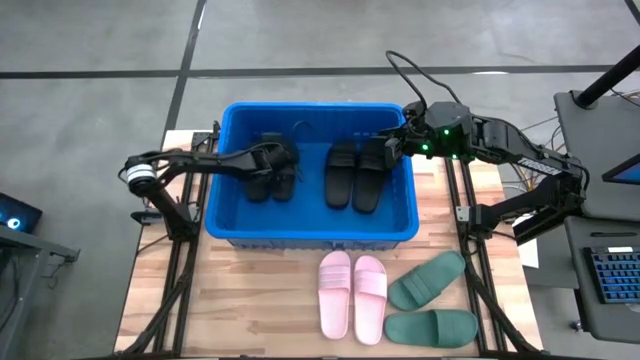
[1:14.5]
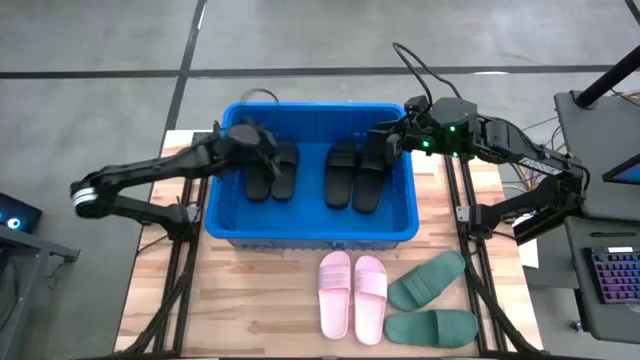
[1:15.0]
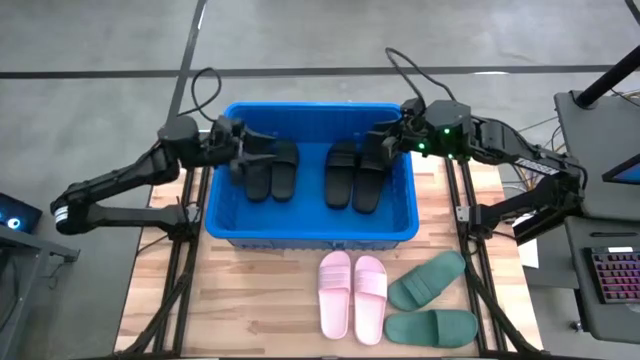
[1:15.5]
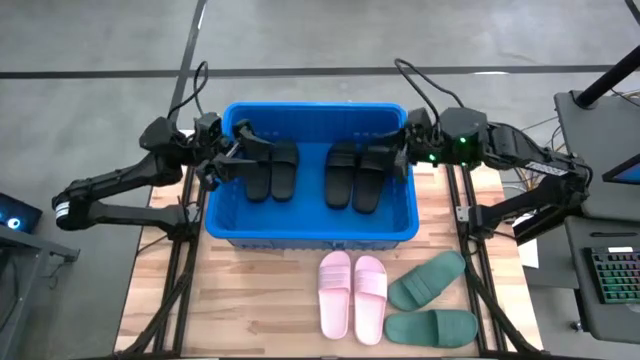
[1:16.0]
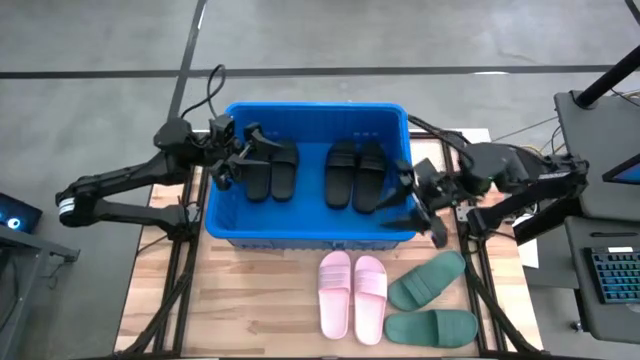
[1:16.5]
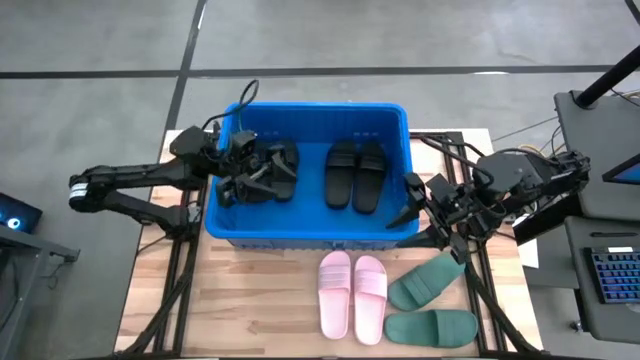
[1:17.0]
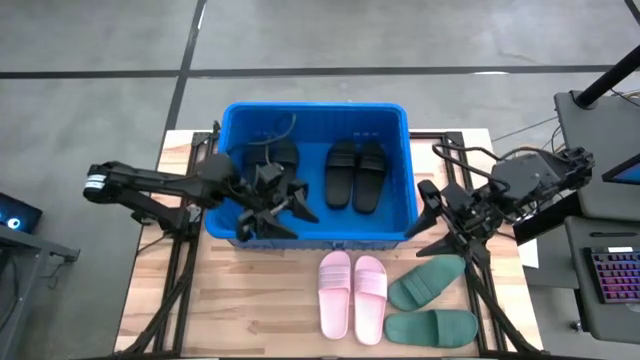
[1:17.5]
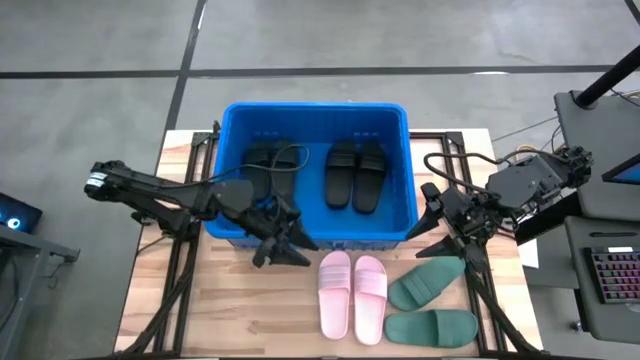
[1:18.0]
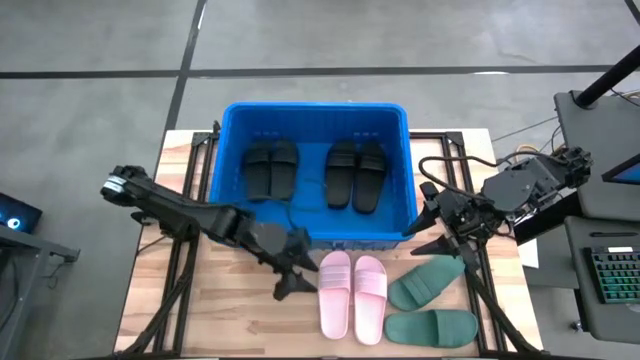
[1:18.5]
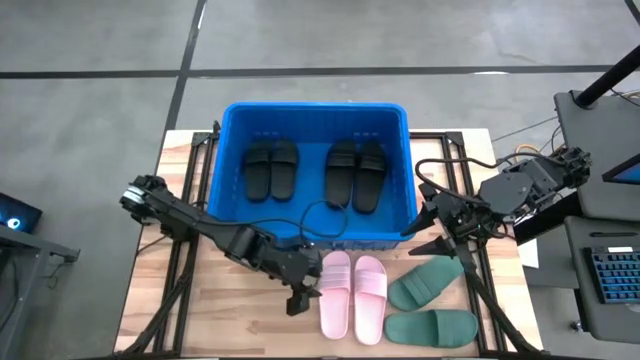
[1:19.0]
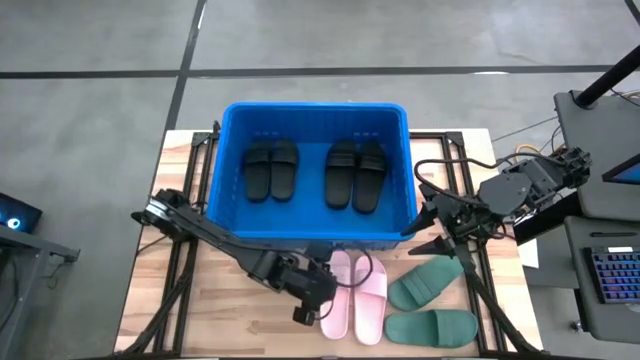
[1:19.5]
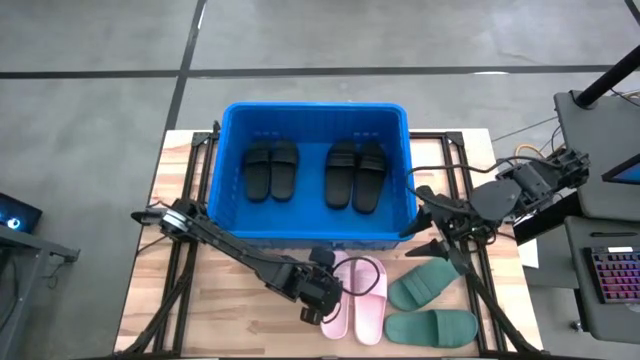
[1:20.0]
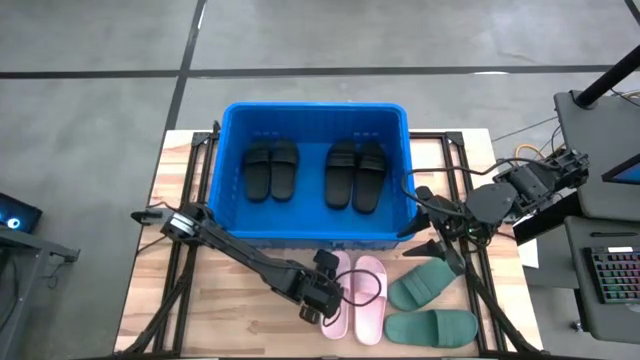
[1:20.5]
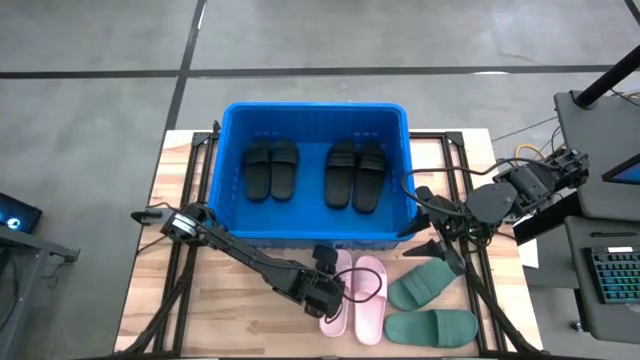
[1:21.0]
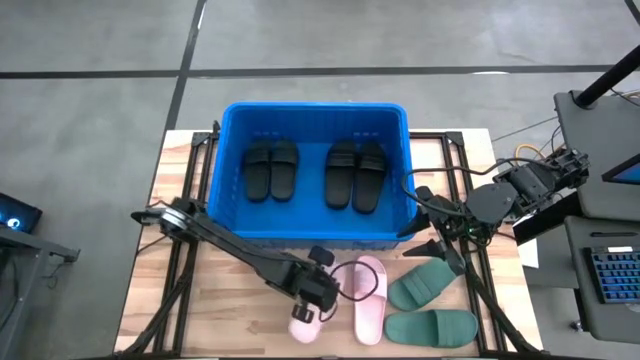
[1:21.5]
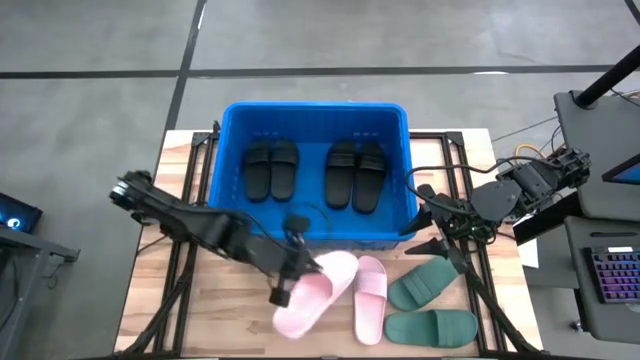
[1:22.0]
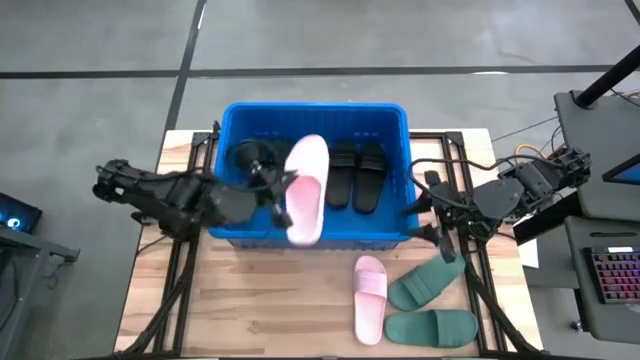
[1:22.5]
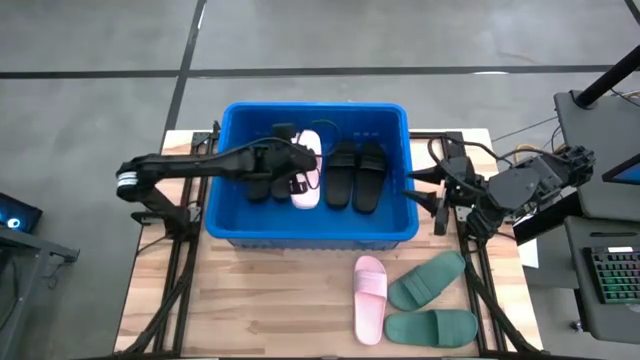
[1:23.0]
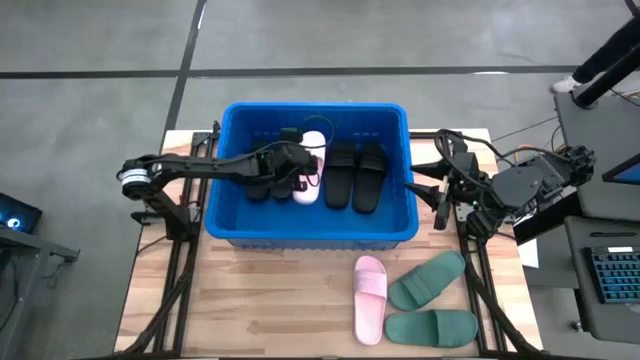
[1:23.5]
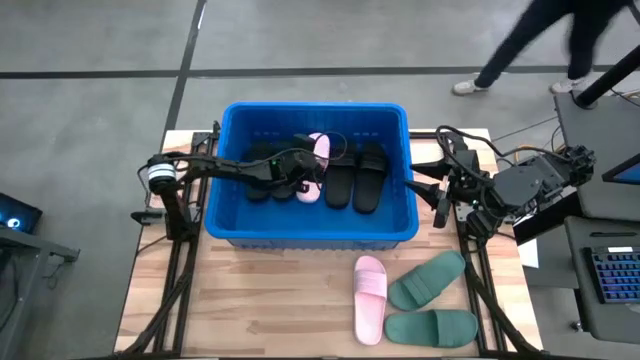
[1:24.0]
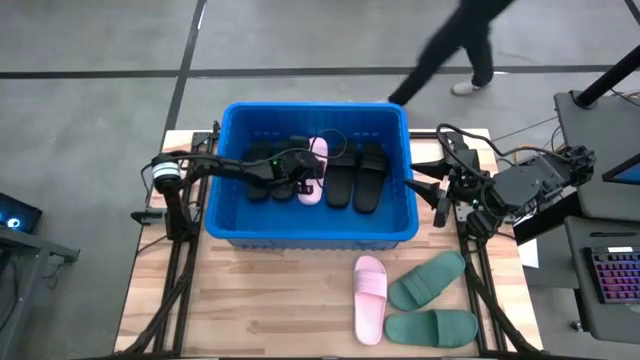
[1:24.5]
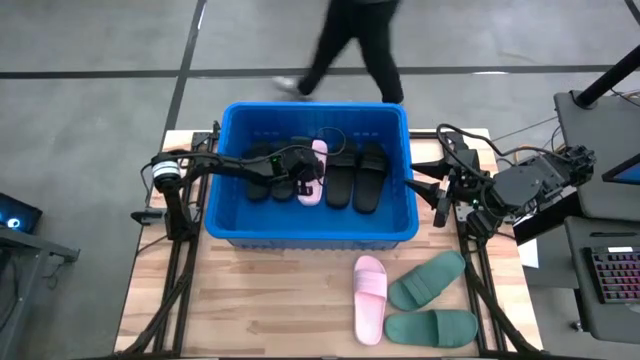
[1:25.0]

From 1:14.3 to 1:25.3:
Task: Pick and place slides into bin
Put the left pink slide into the blue bin

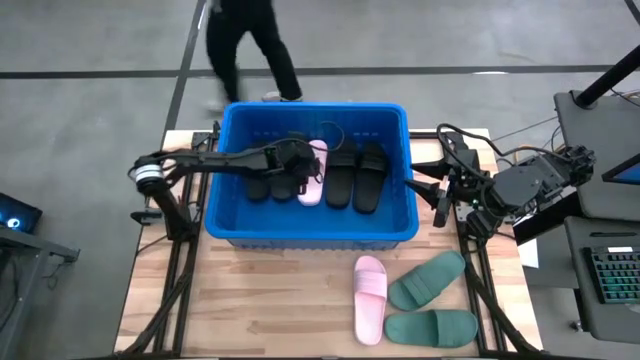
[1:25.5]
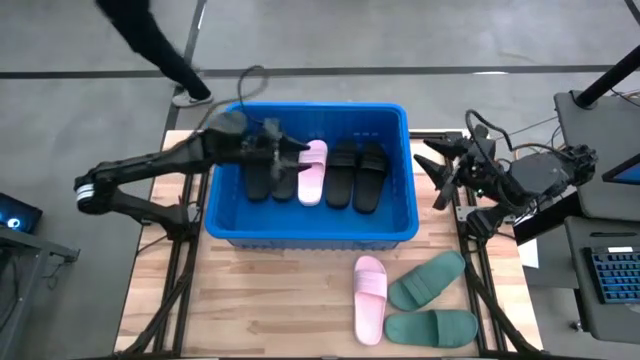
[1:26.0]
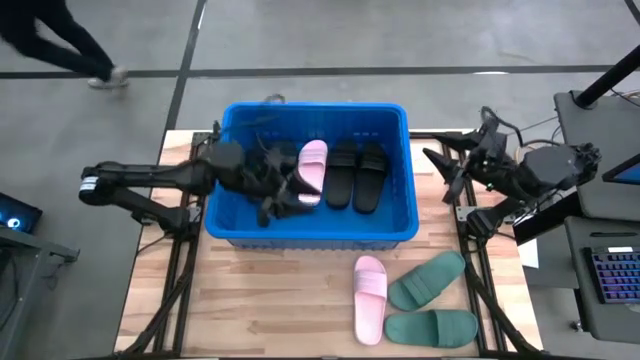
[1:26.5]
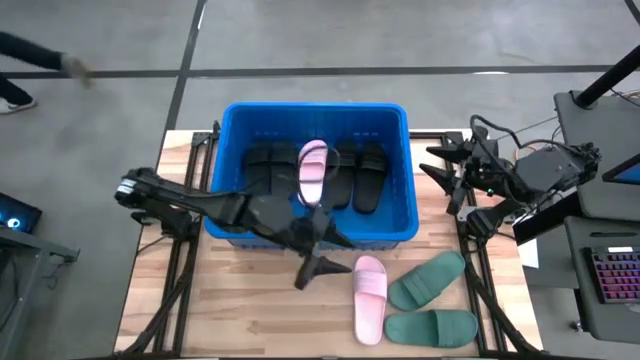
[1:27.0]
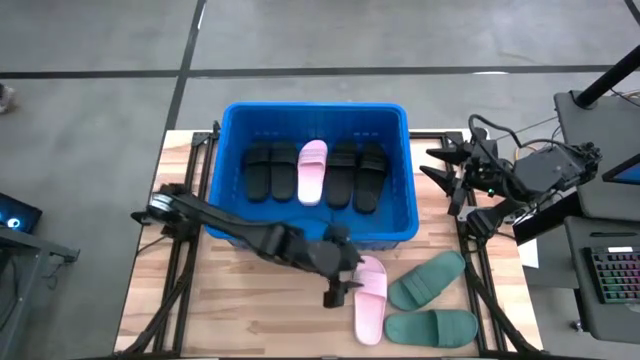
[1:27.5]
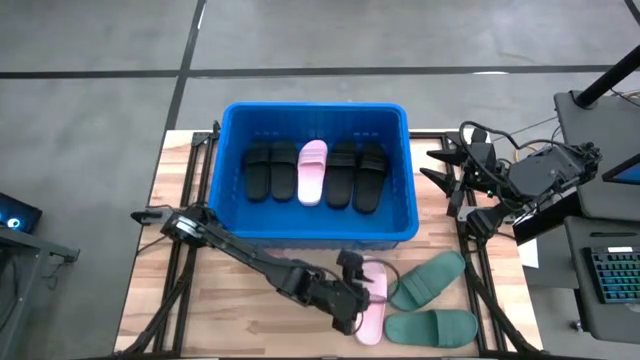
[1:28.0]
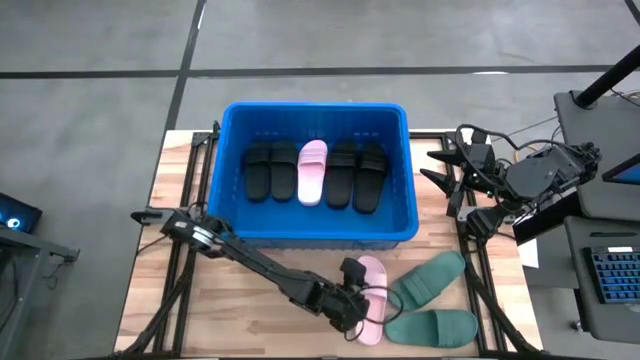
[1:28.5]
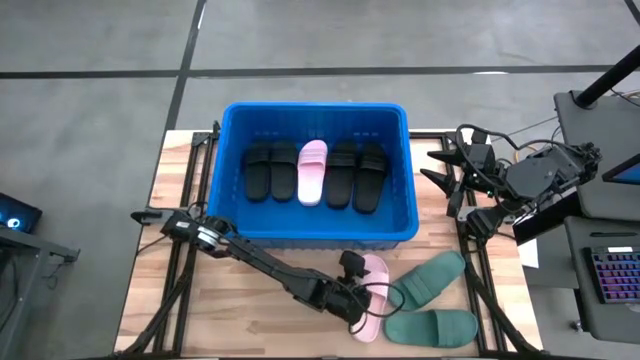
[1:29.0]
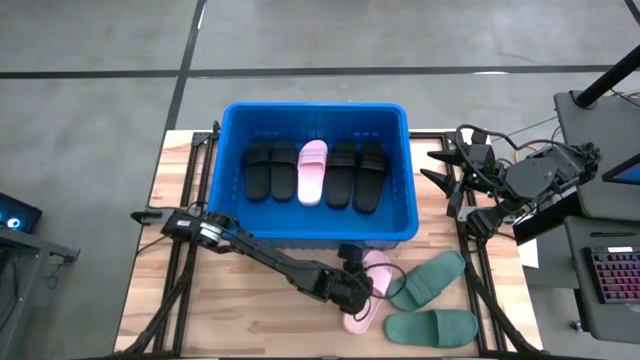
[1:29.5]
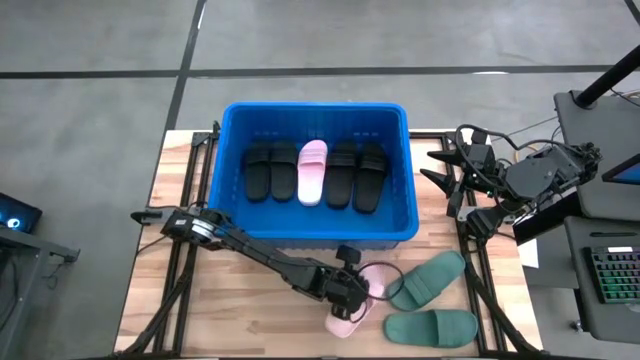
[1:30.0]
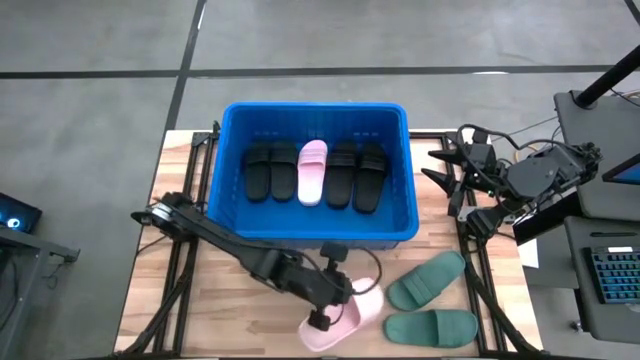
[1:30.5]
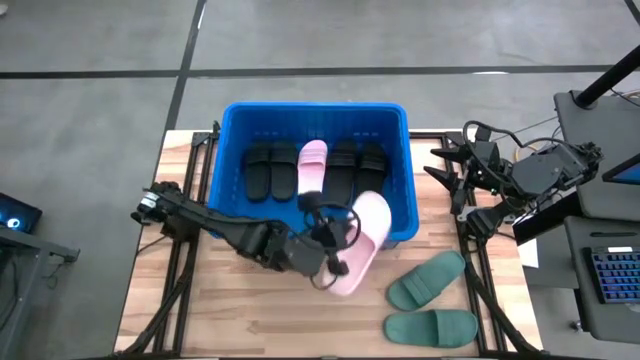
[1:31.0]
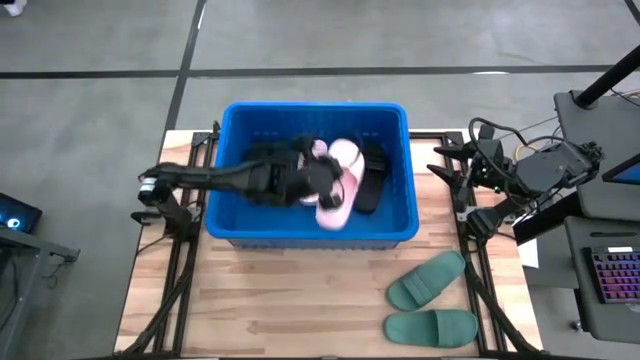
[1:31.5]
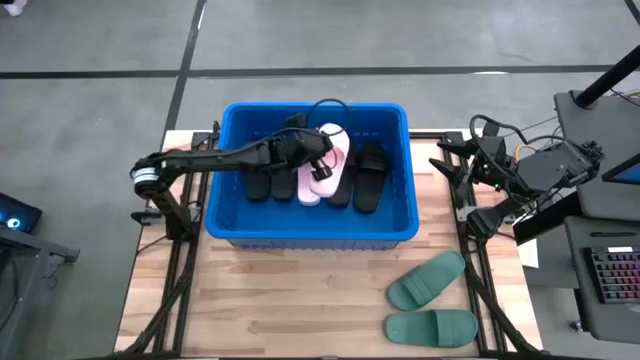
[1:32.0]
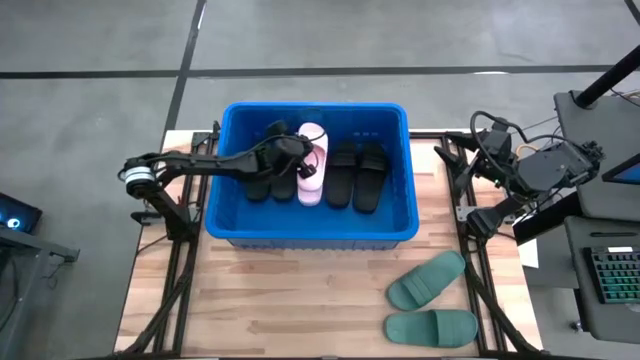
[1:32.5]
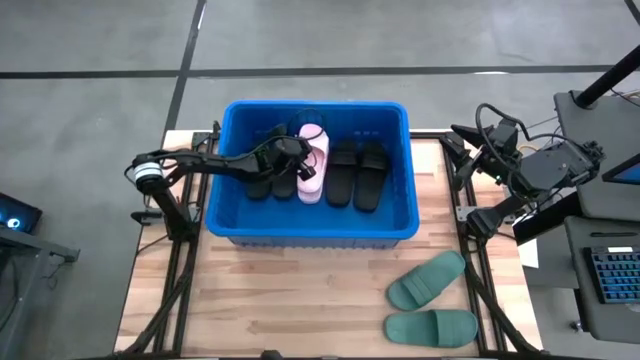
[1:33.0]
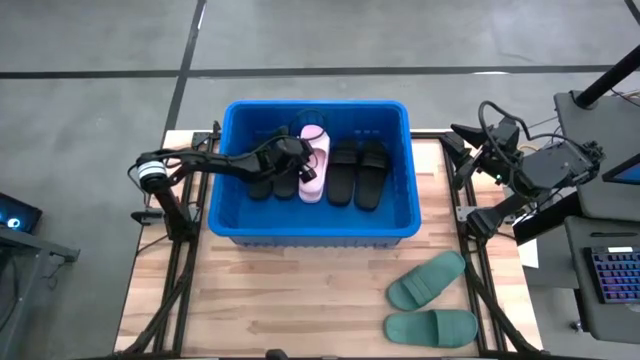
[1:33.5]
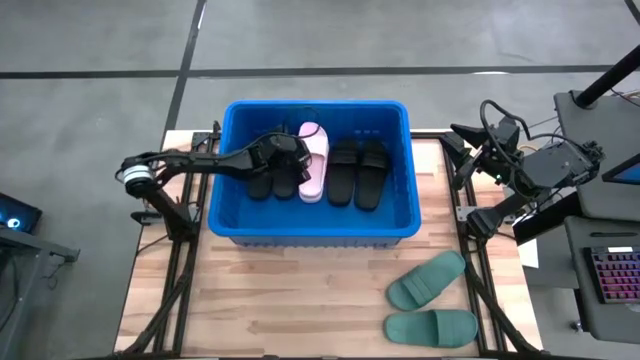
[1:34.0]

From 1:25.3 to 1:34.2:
Put the pink slide into the blue bin
